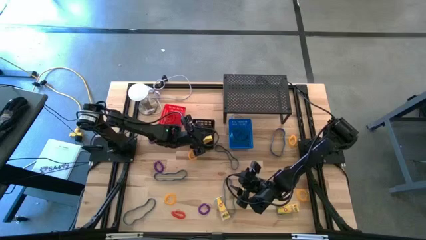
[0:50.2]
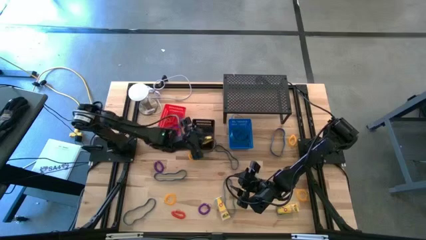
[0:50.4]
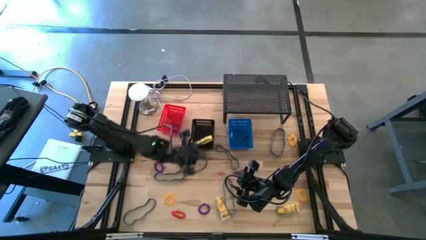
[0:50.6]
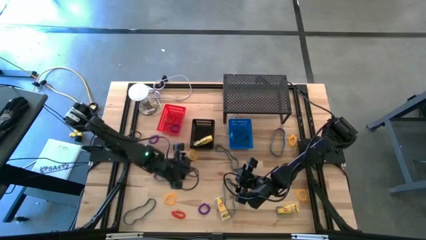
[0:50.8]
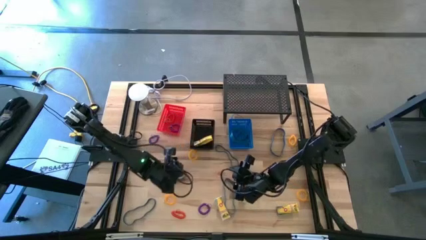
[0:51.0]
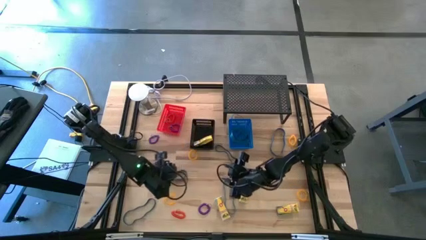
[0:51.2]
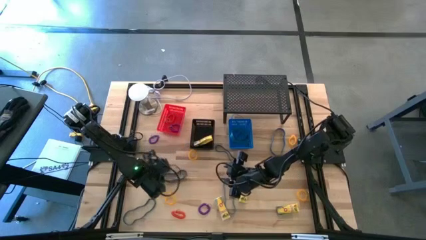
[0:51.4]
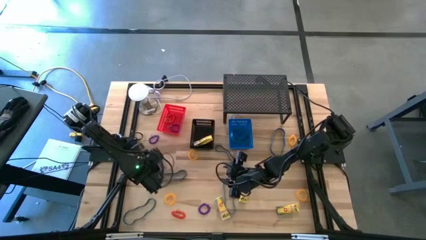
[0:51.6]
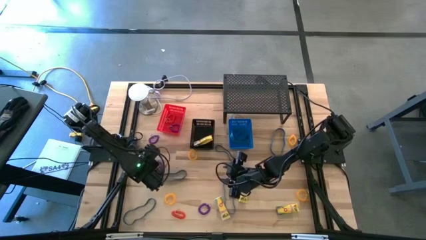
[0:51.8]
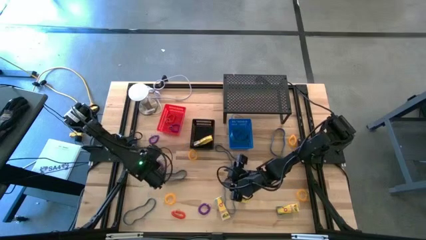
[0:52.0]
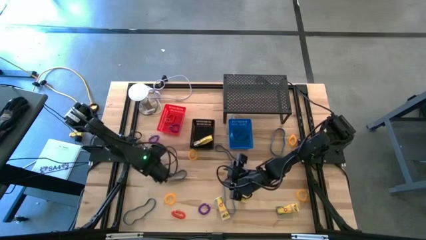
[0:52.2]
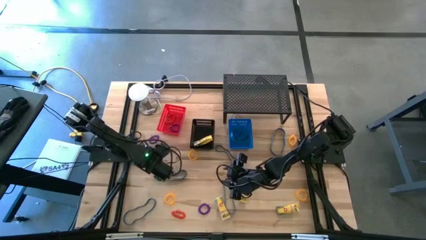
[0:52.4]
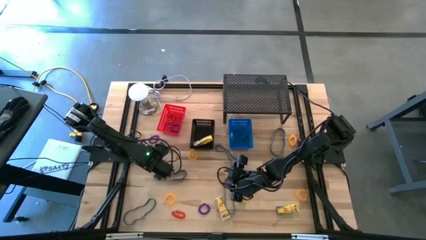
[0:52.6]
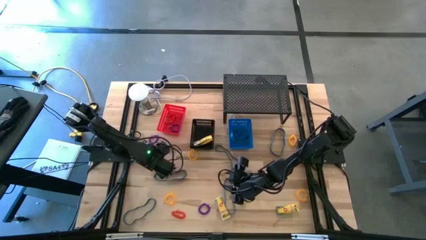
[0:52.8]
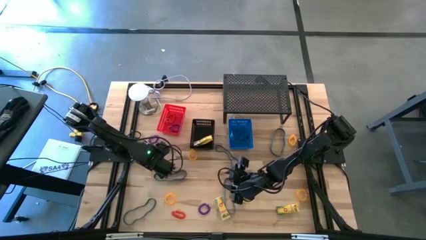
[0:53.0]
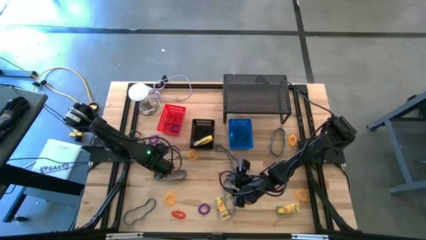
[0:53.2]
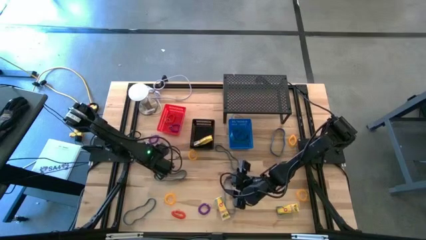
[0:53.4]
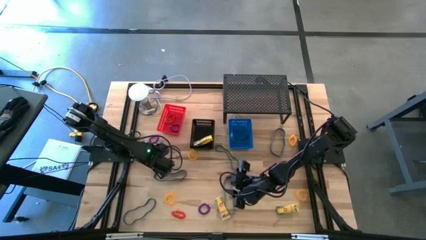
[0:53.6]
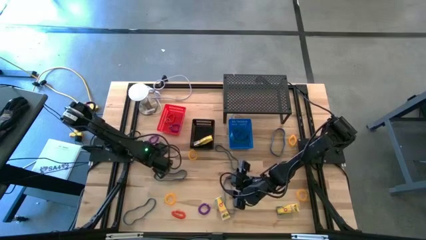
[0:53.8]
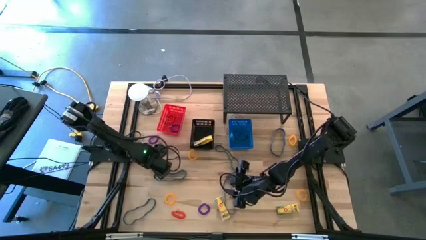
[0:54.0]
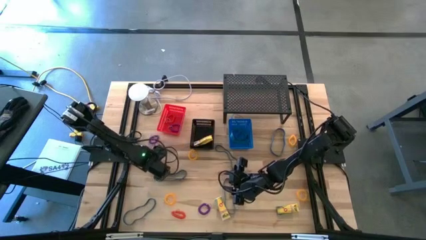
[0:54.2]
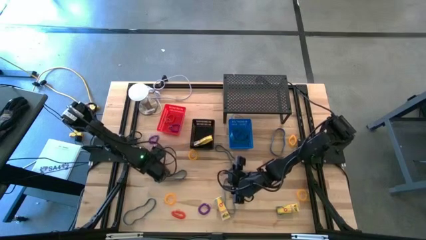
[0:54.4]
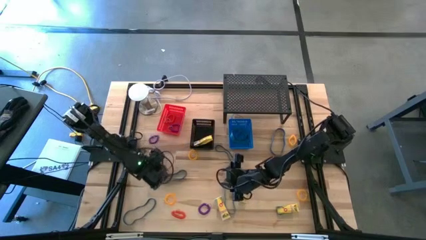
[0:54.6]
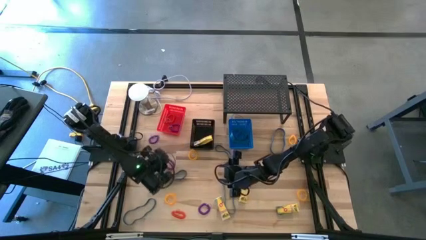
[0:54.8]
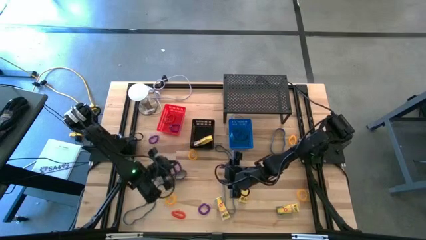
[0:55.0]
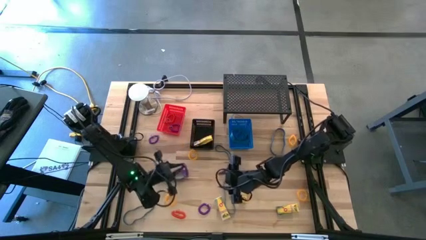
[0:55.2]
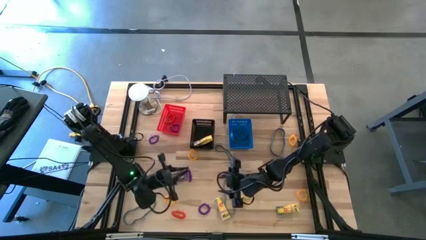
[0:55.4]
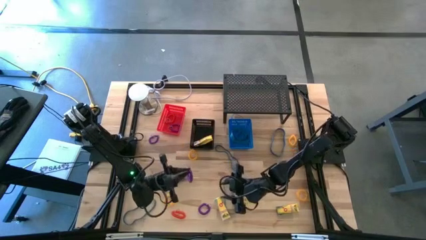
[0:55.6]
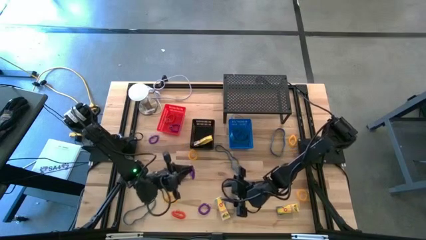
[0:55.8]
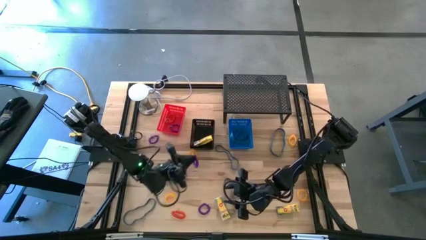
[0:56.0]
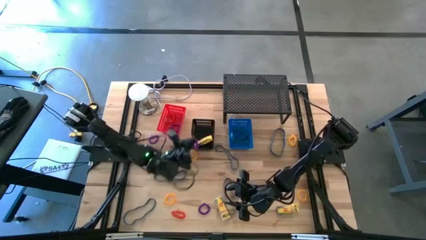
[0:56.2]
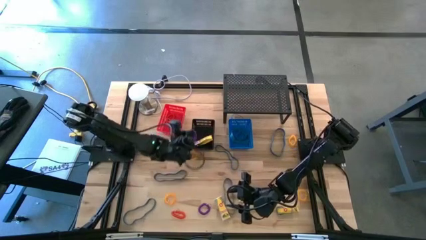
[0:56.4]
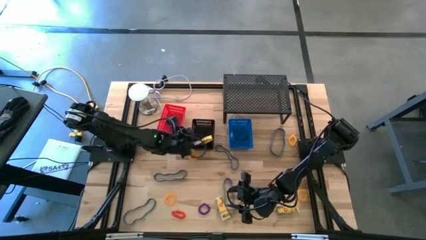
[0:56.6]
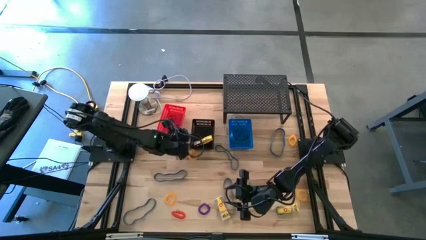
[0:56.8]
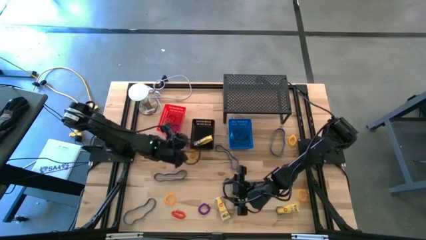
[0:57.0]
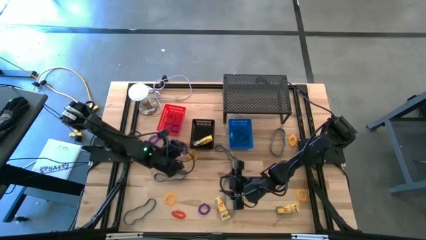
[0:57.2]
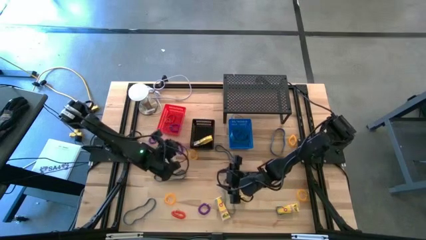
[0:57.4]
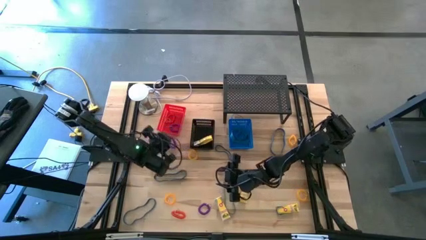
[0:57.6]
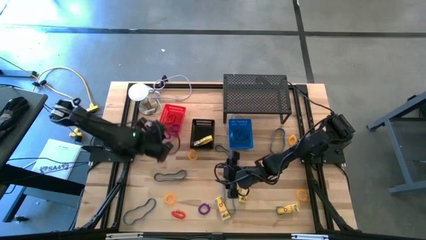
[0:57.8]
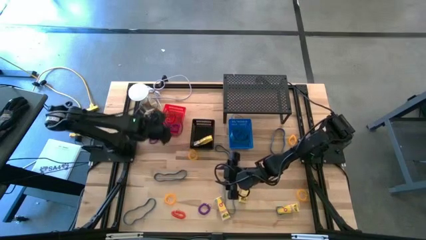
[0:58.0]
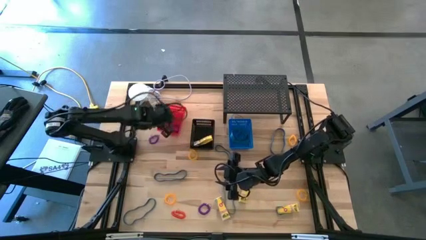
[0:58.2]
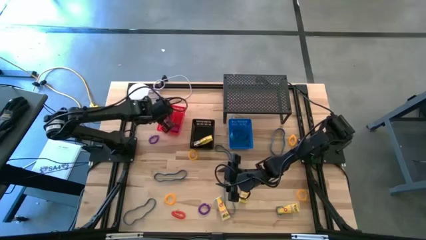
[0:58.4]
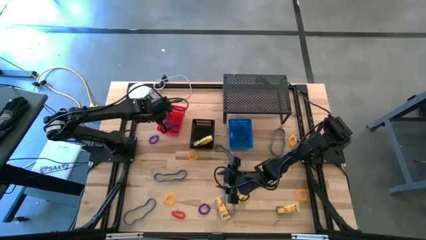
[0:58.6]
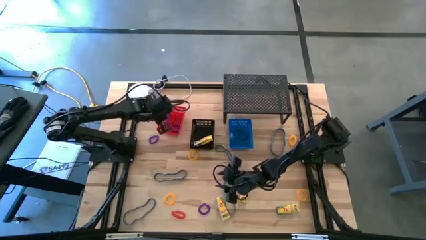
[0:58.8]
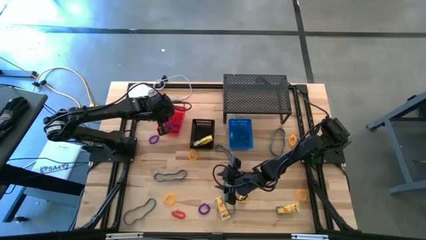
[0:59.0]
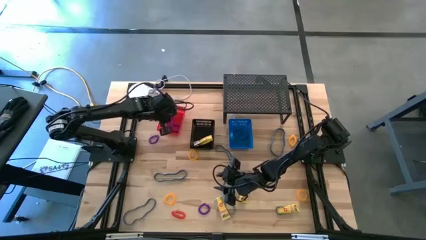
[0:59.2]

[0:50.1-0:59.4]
Task: Pick & Place Office Desk Supplies
Put the bottom left purple wrist coil keychain into the orange bin

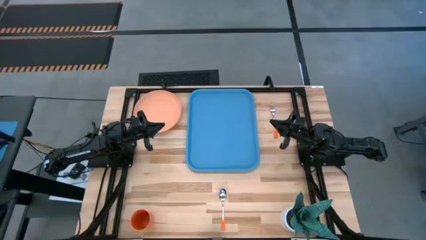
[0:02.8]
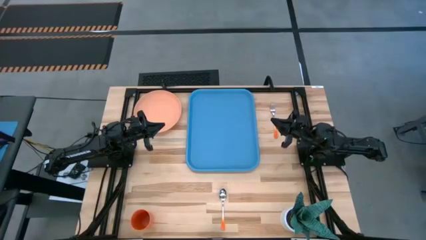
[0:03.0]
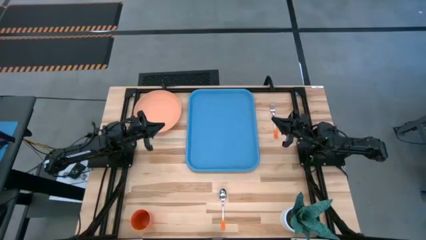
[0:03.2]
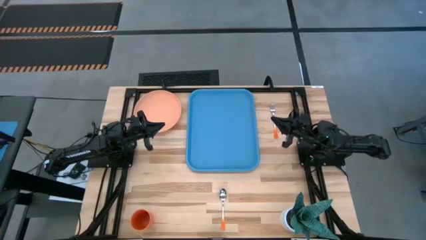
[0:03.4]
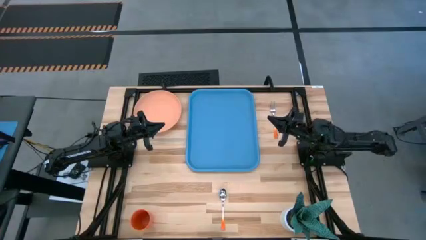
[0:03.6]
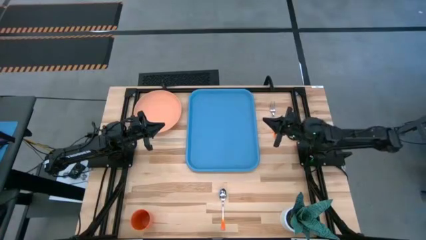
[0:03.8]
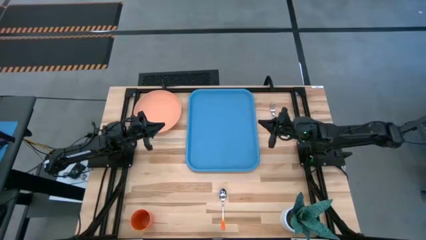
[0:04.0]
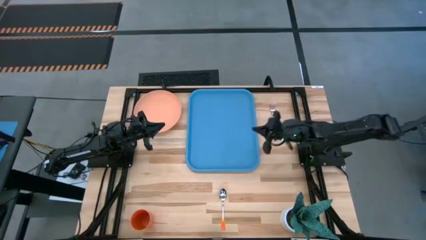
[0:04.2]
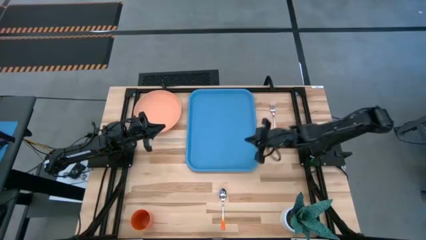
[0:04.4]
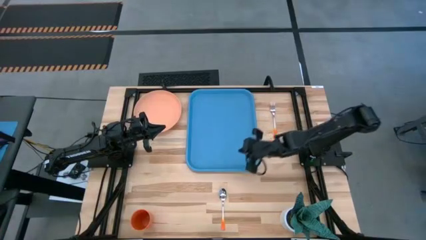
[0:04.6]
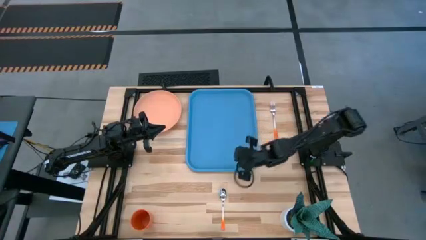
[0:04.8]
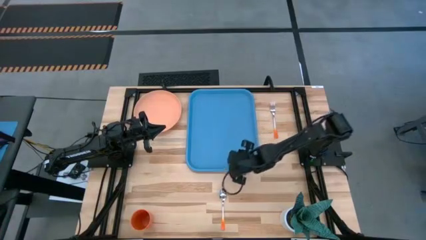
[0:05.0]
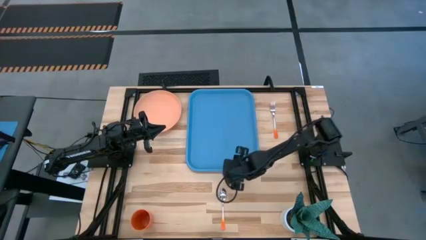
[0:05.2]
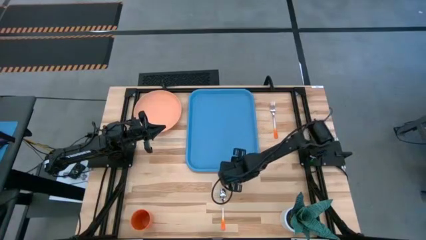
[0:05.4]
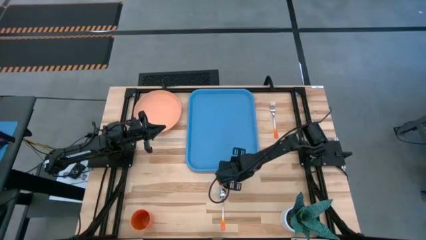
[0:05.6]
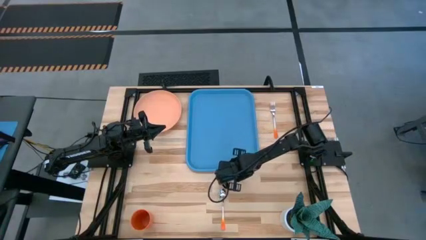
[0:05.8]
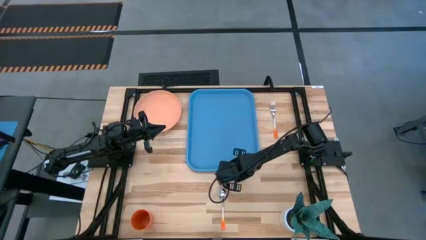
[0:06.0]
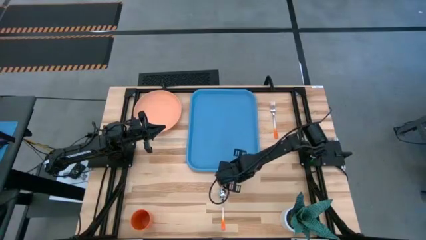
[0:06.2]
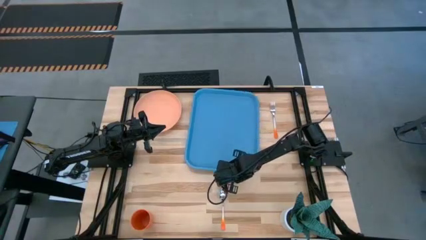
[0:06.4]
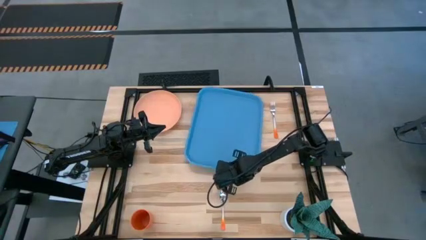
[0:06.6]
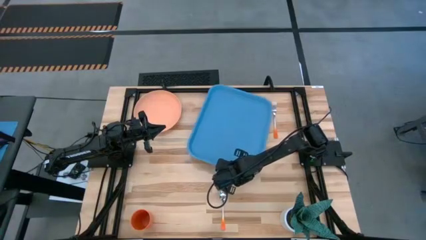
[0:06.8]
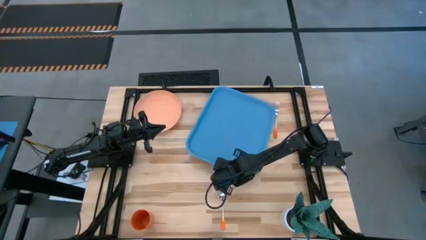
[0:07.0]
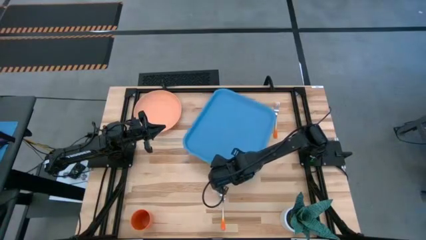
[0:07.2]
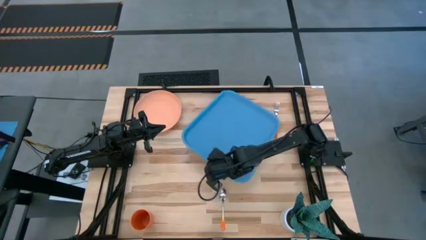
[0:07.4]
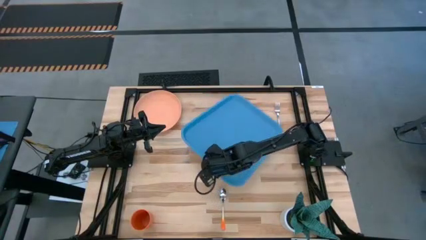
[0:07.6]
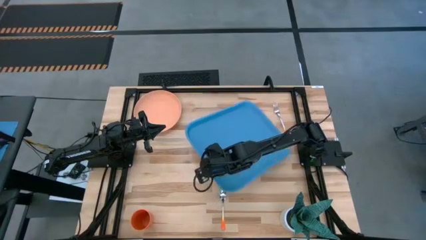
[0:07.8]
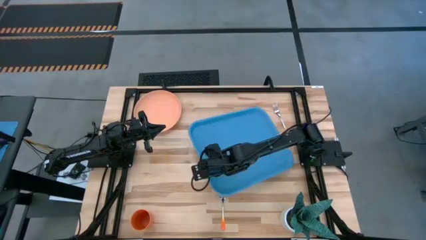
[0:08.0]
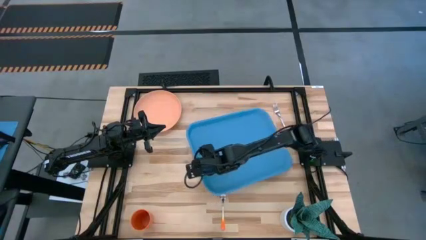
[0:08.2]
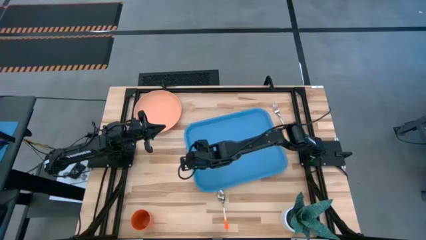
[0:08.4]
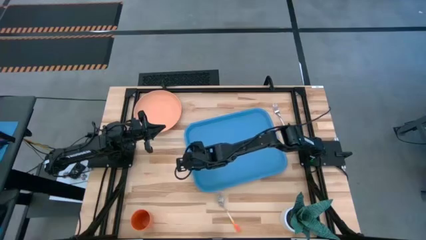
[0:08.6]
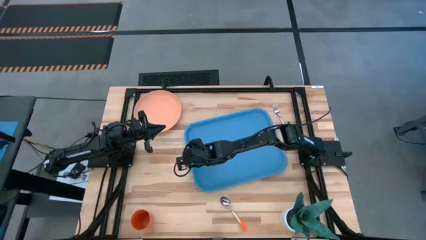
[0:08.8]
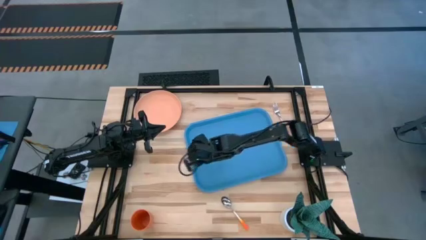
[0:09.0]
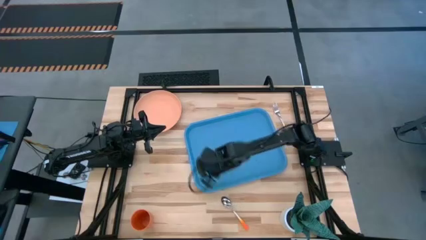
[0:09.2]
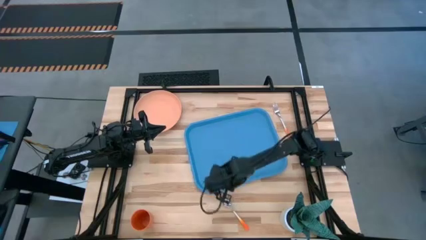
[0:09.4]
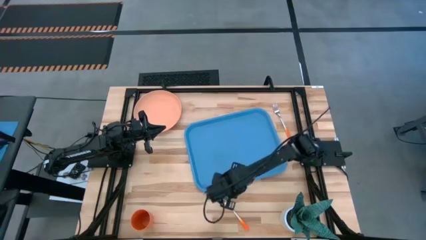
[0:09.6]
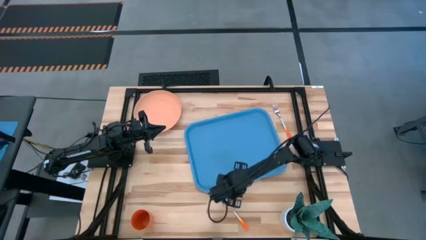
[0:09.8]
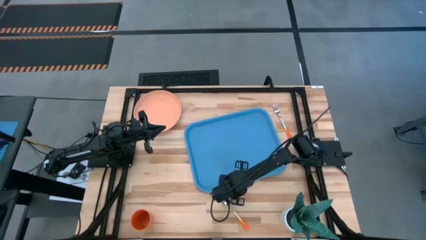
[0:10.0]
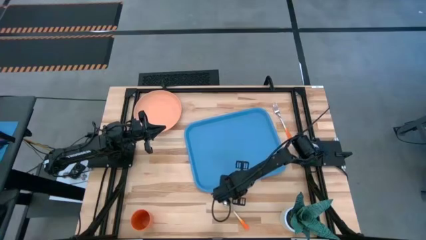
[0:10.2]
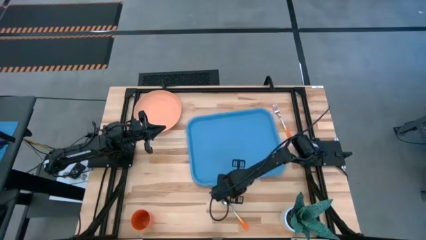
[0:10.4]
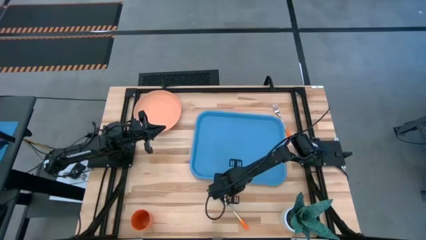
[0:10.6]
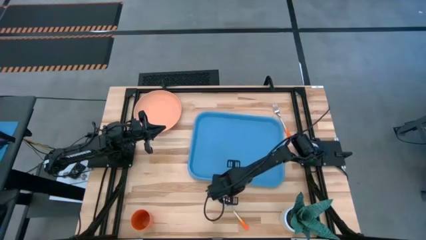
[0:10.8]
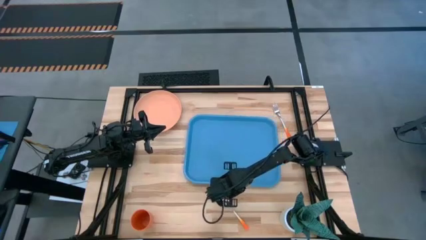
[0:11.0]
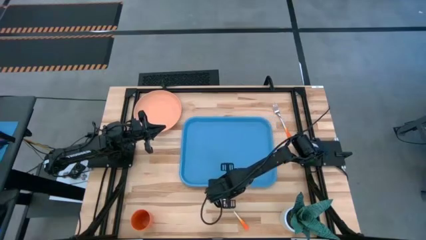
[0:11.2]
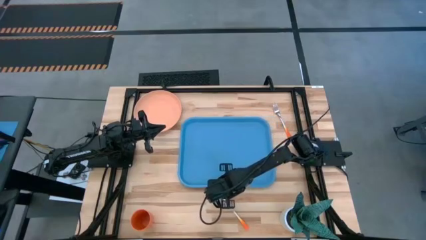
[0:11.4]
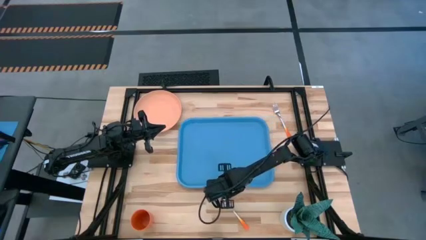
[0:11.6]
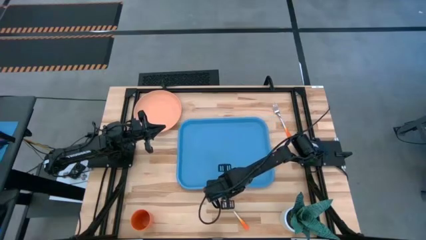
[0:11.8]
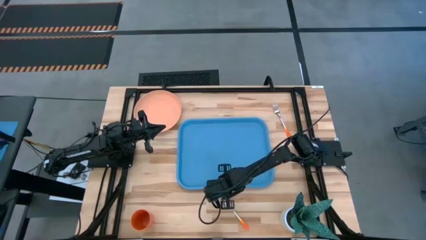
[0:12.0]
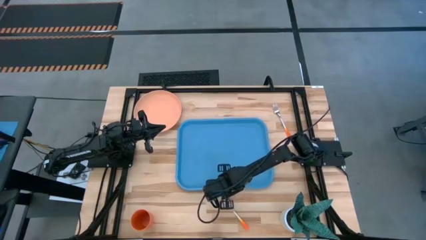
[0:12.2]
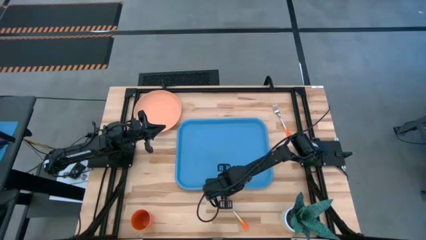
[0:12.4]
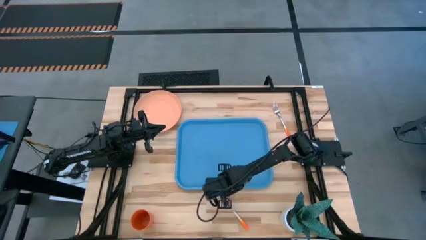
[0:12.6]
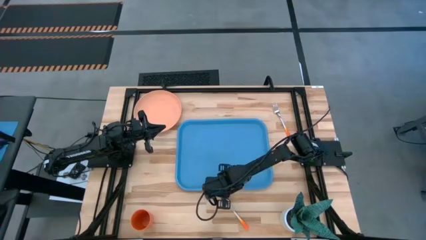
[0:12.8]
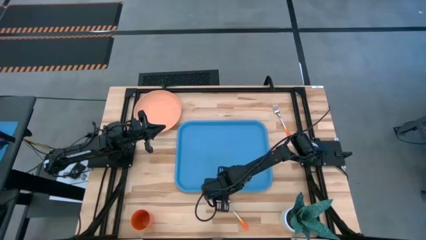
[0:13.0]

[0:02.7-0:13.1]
Task: Pick and place plate/cup/fork/spoon on tray
Prepare the blue serving tray on the table
